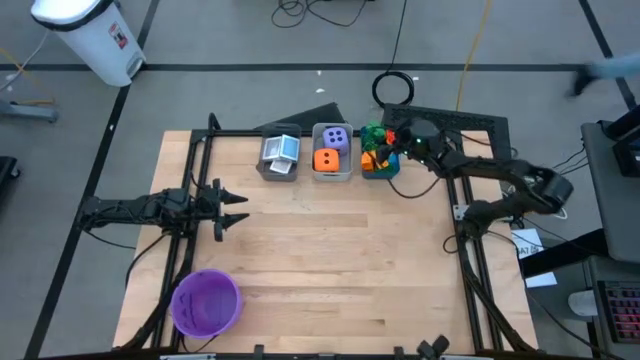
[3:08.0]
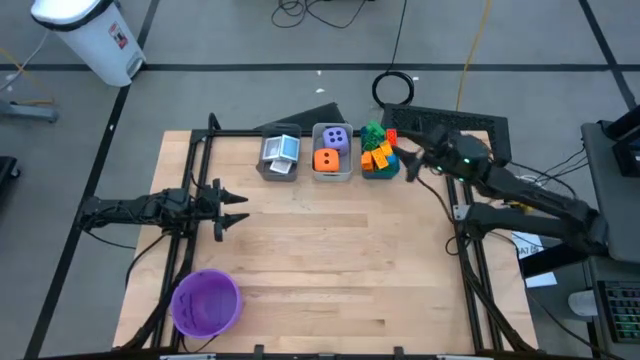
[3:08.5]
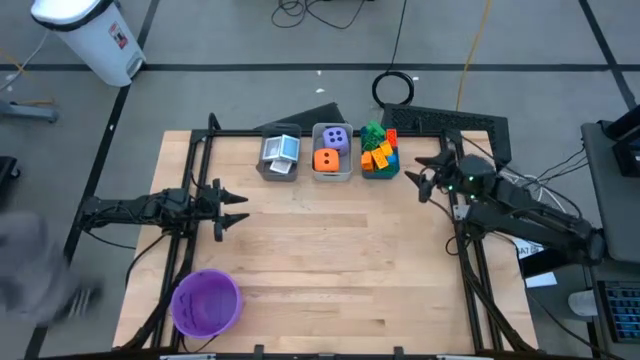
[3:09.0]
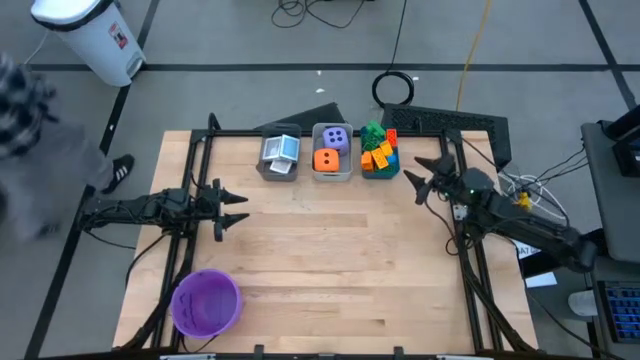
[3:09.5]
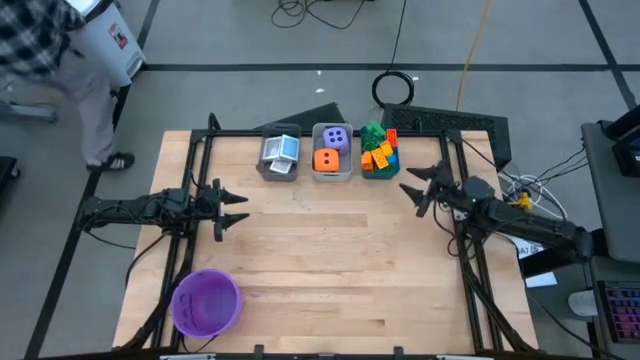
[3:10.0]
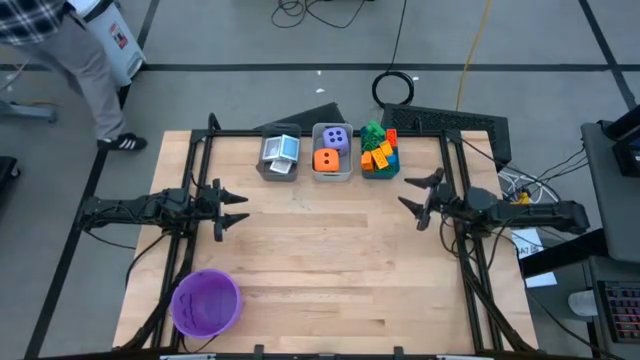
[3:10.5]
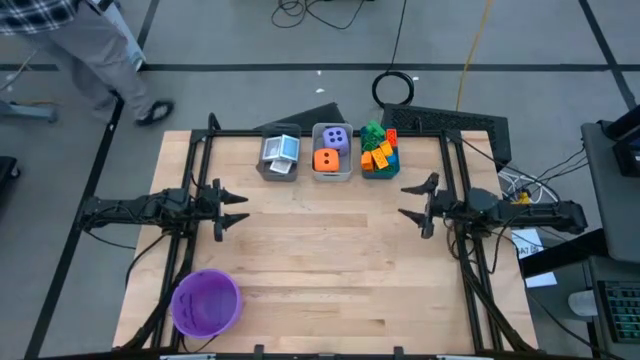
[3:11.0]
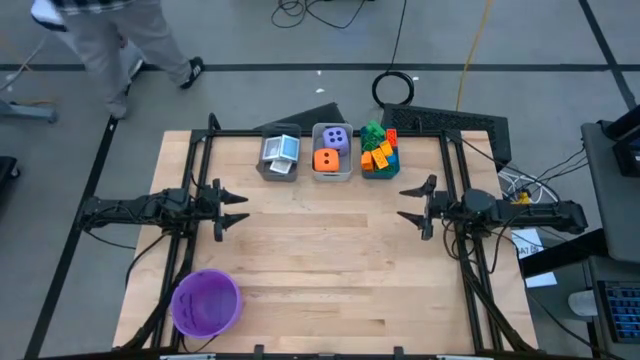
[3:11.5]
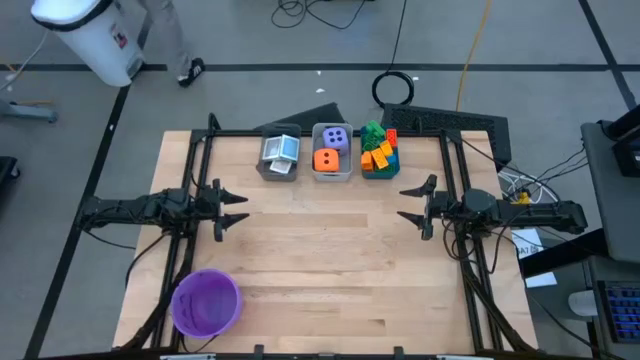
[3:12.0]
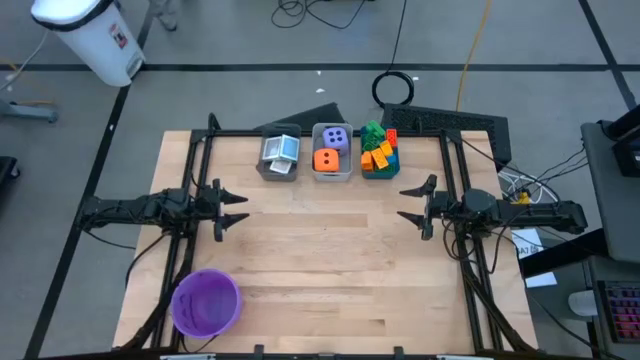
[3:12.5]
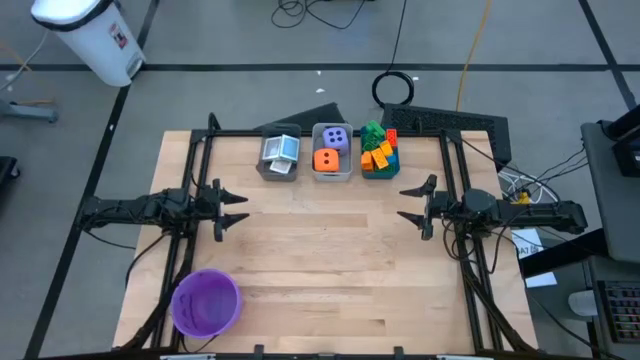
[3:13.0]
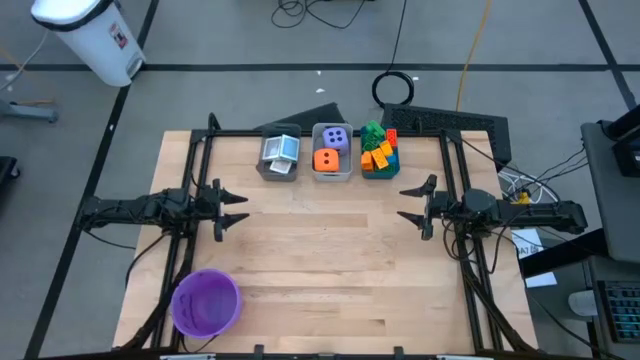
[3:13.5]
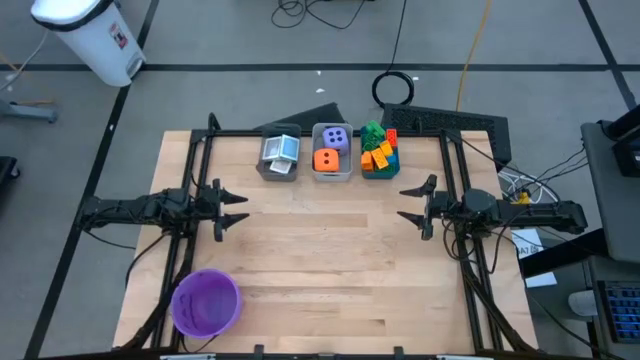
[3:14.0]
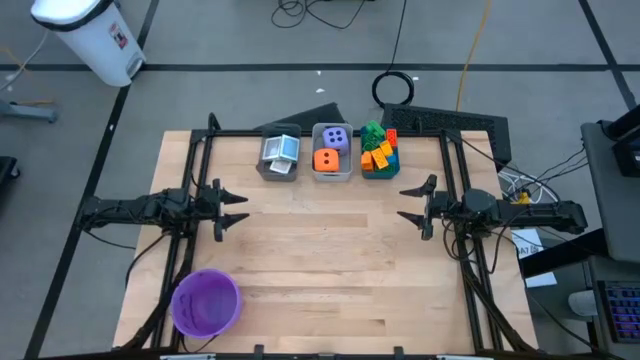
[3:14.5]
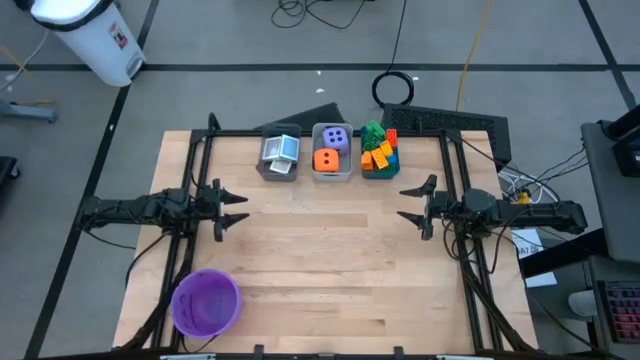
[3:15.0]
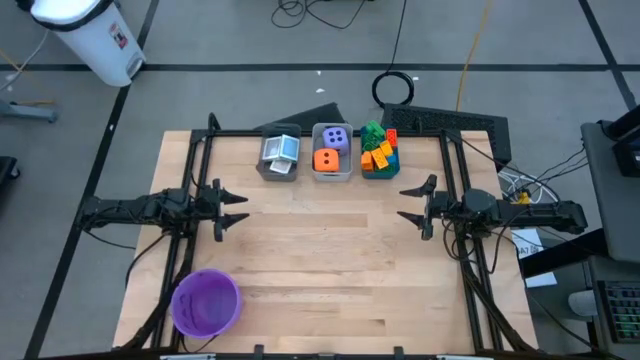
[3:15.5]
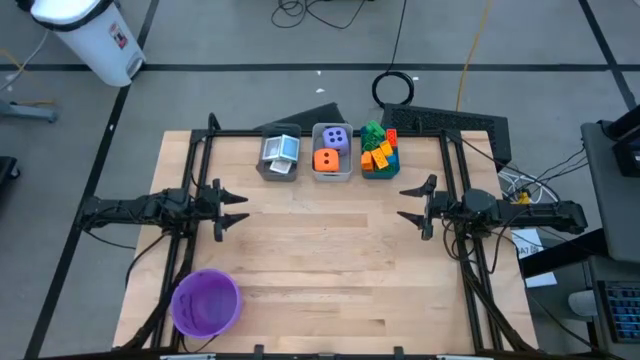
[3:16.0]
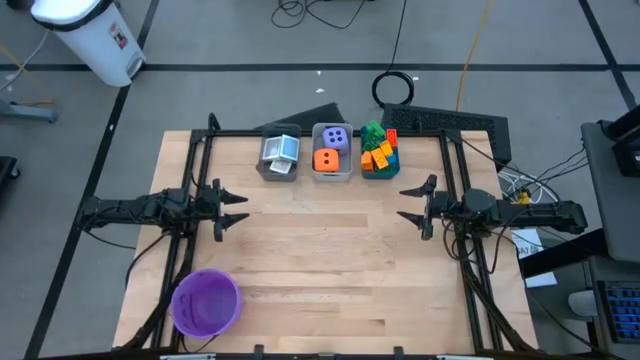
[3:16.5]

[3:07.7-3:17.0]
Task: Pick & Place Toys
Return to Home Position

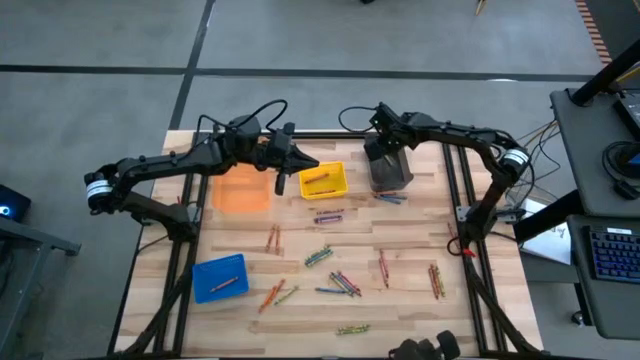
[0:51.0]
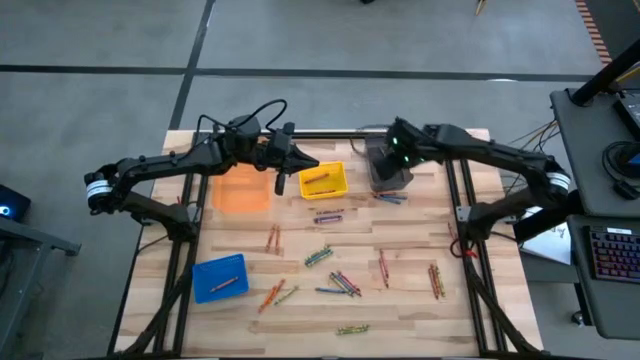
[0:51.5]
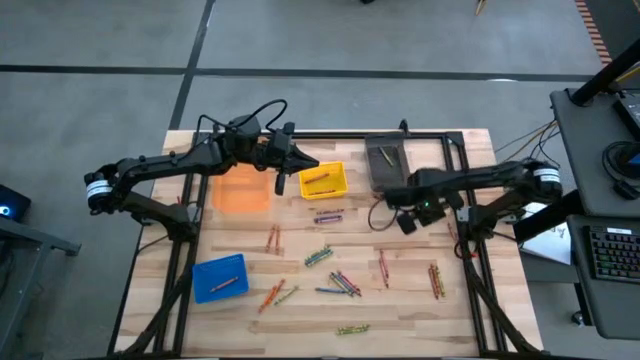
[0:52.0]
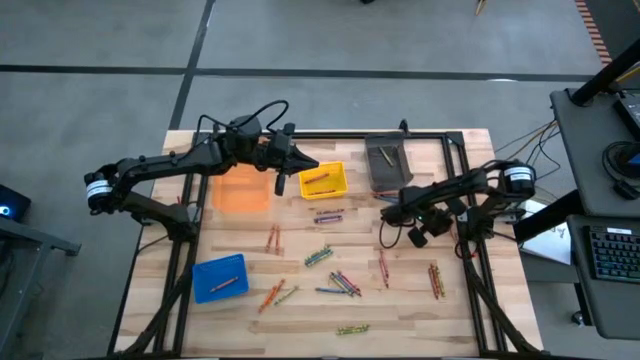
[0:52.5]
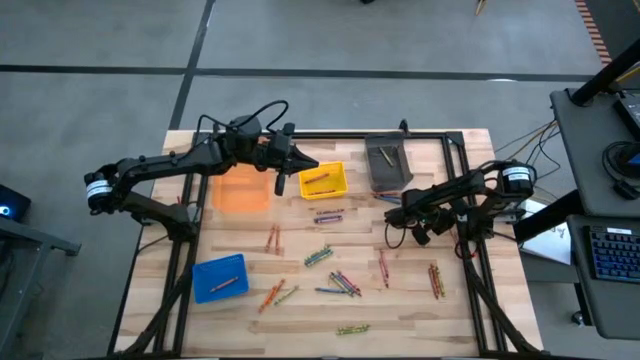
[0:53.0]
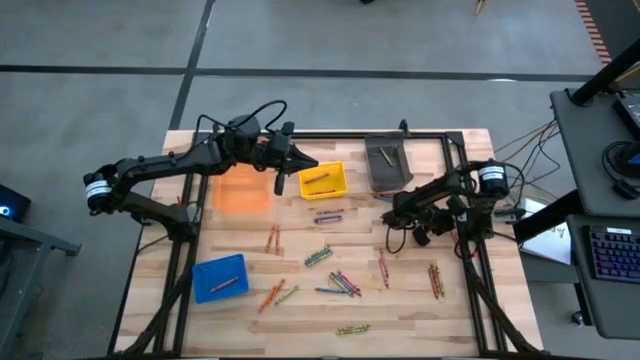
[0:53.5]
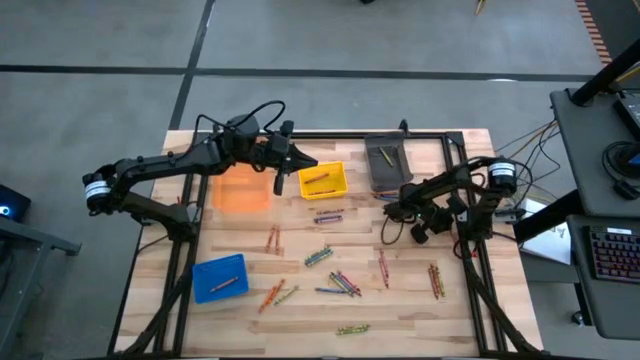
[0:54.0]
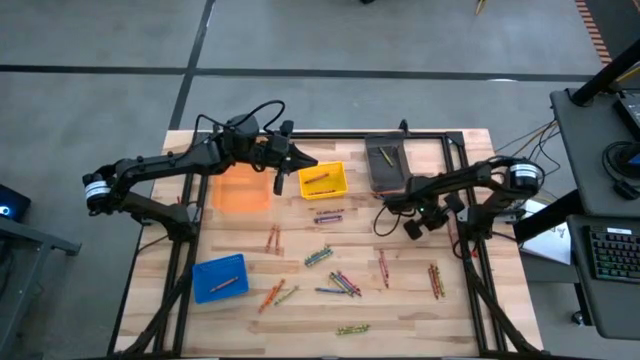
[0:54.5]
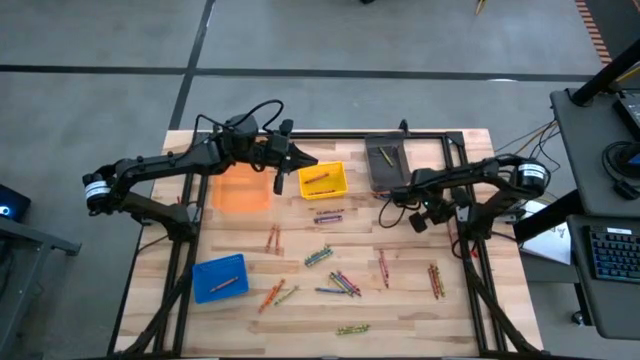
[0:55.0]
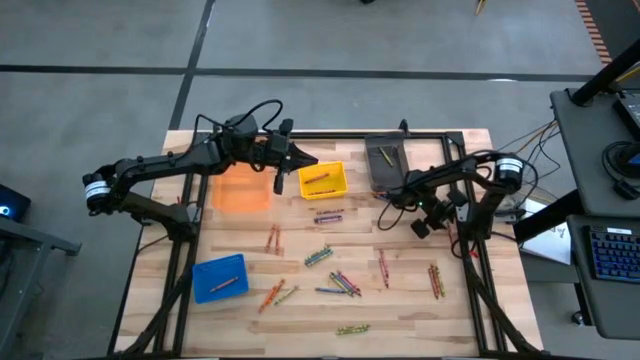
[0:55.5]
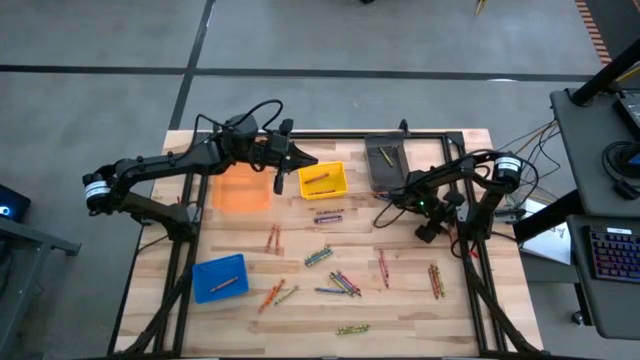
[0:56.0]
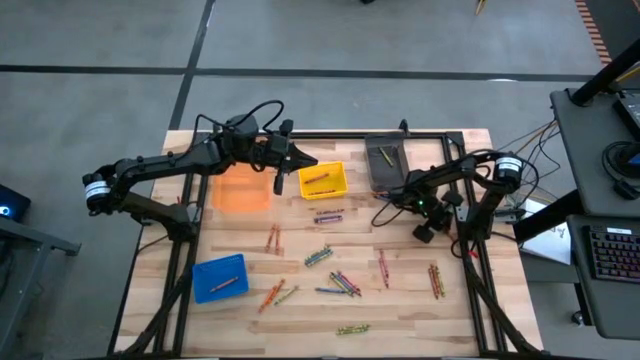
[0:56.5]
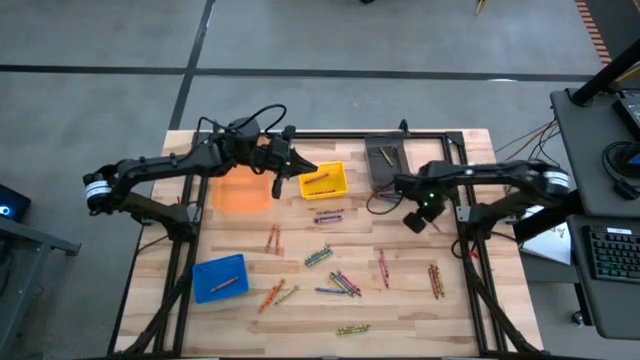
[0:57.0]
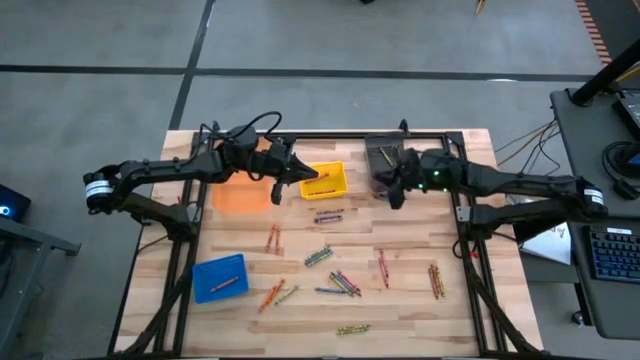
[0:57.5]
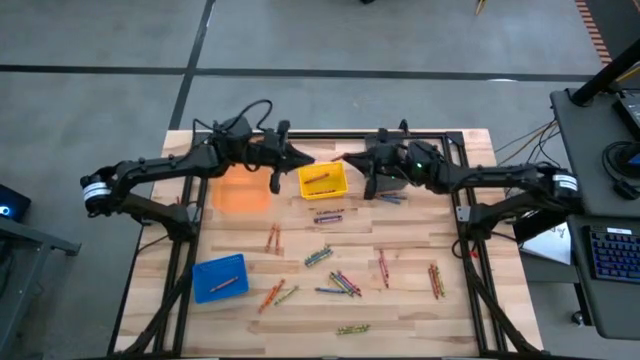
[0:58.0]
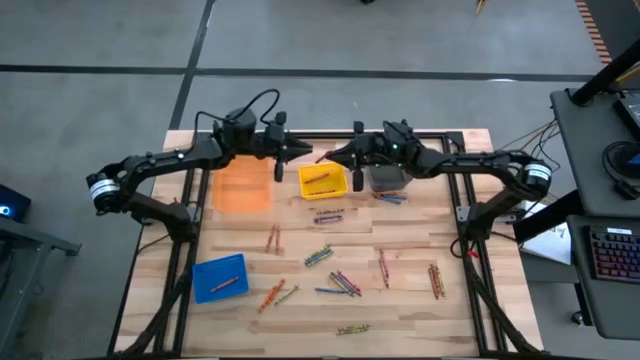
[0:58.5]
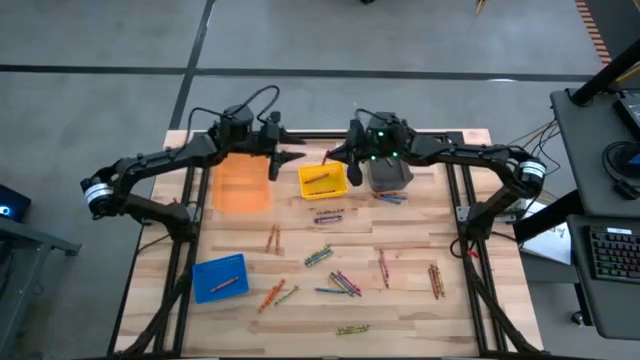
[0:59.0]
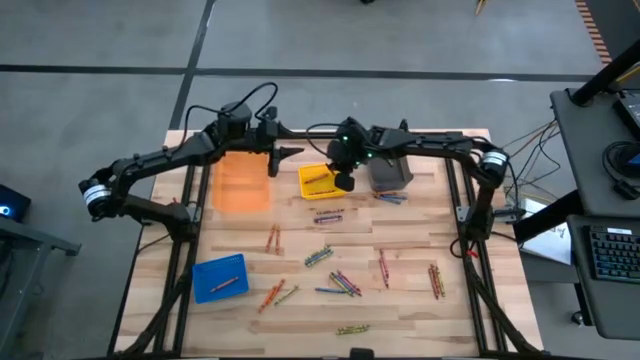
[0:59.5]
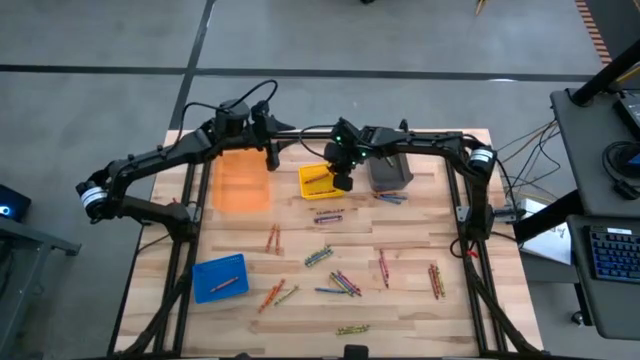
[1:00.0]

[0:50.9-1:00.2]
Task: Sort crayons
Put the red crayon into the yellow bin
